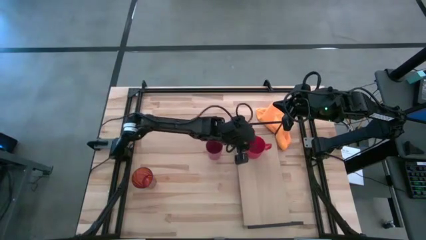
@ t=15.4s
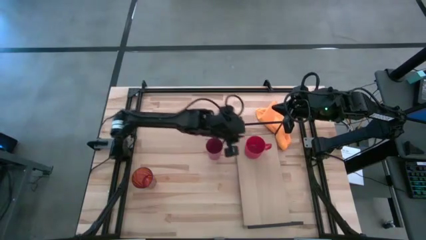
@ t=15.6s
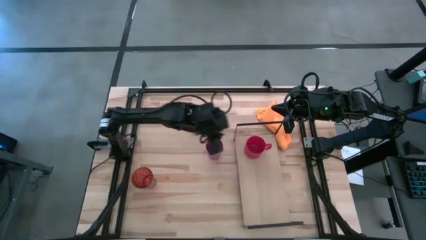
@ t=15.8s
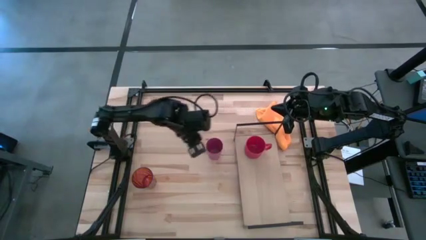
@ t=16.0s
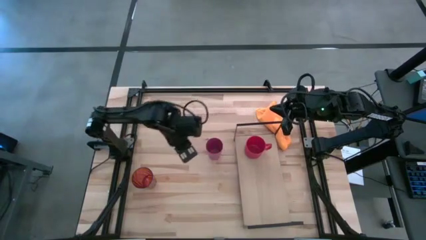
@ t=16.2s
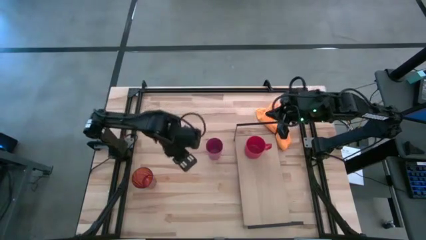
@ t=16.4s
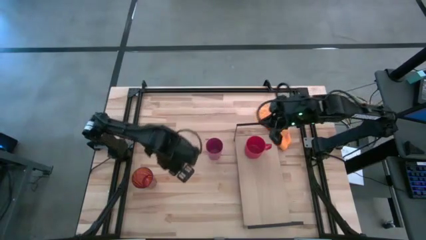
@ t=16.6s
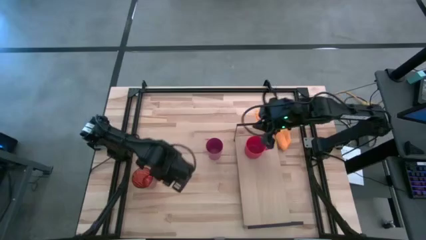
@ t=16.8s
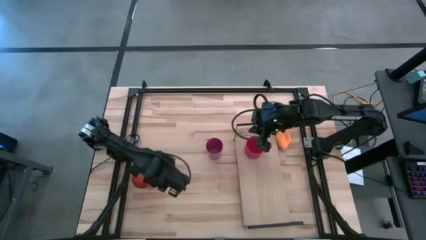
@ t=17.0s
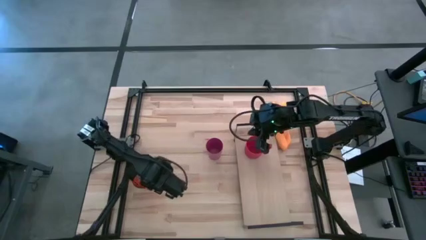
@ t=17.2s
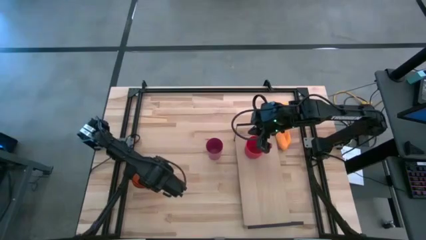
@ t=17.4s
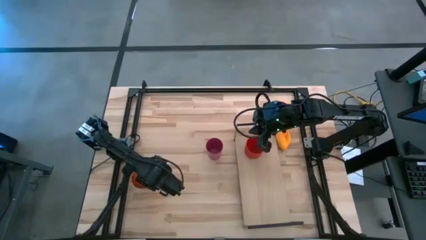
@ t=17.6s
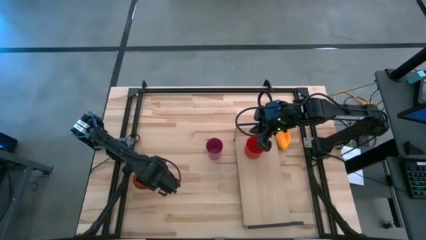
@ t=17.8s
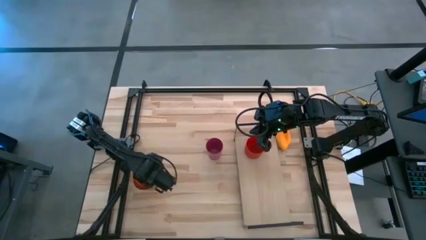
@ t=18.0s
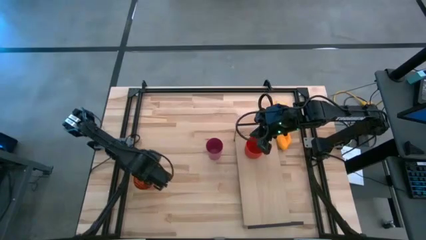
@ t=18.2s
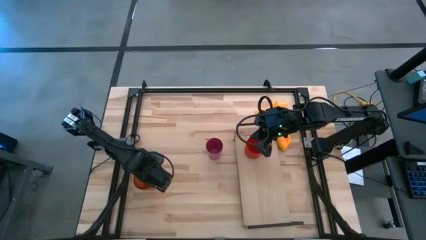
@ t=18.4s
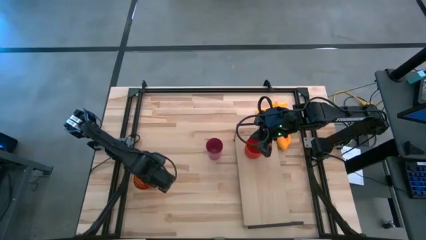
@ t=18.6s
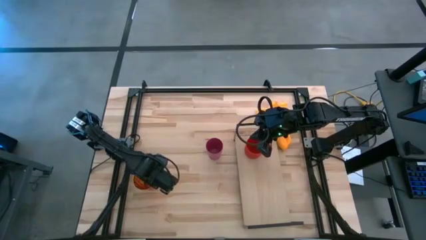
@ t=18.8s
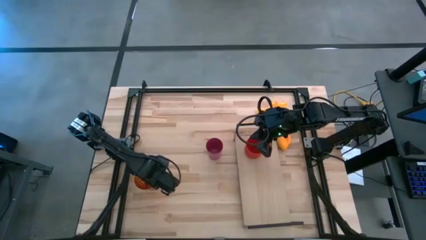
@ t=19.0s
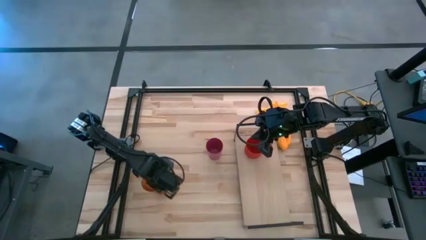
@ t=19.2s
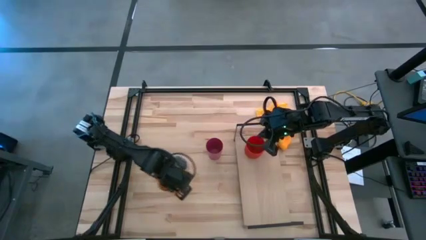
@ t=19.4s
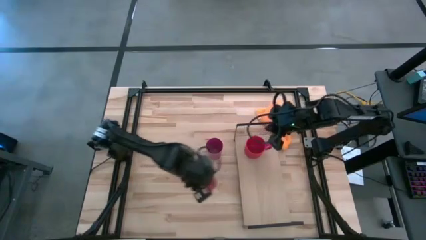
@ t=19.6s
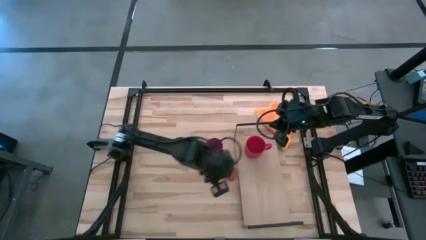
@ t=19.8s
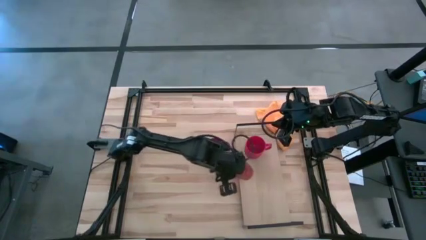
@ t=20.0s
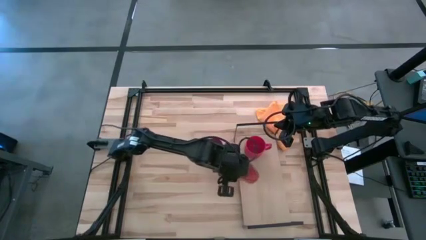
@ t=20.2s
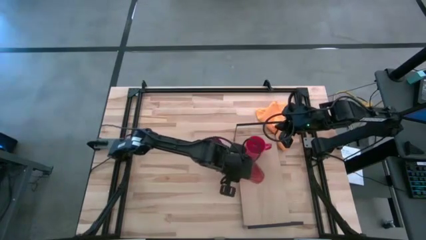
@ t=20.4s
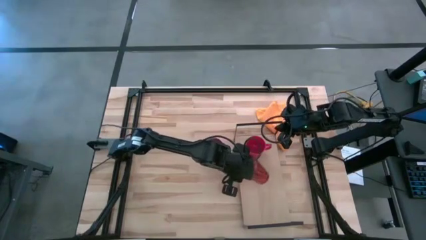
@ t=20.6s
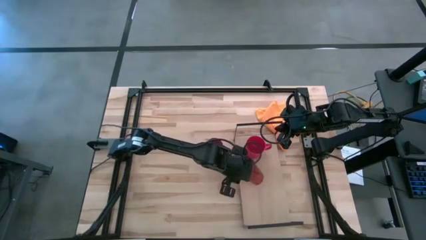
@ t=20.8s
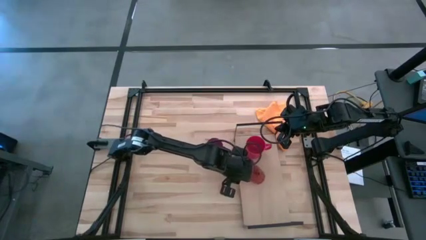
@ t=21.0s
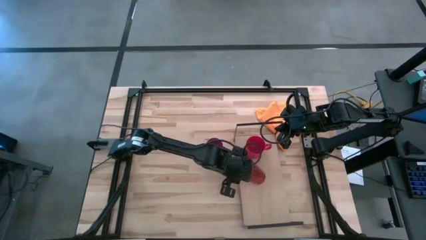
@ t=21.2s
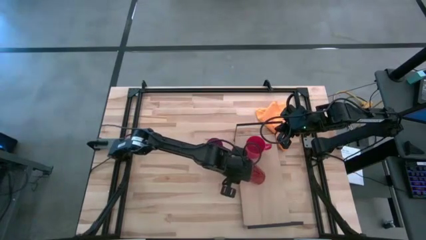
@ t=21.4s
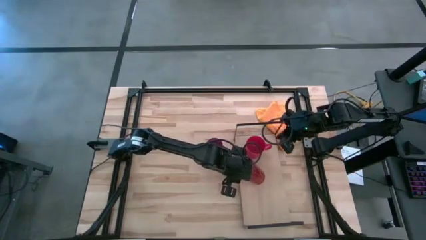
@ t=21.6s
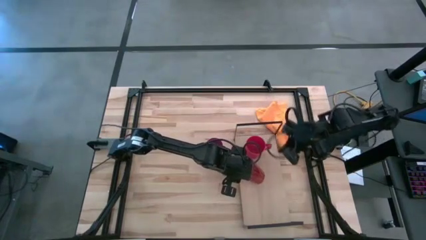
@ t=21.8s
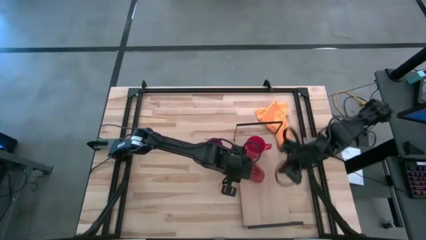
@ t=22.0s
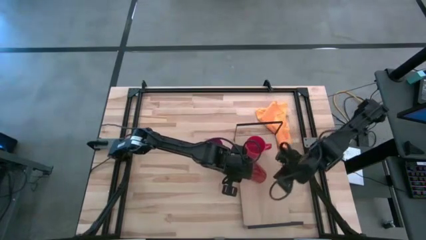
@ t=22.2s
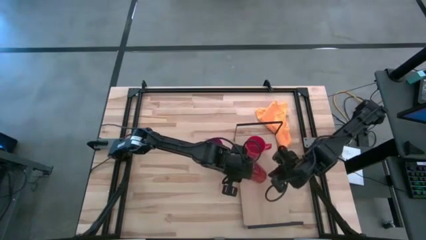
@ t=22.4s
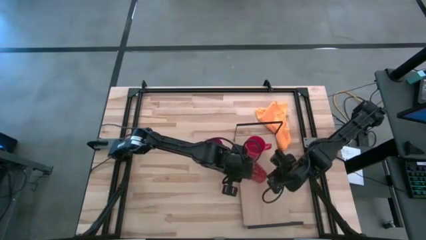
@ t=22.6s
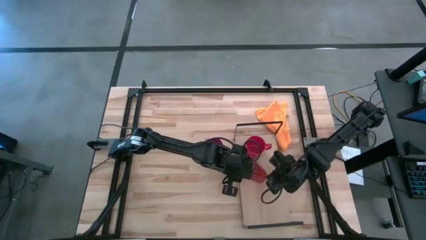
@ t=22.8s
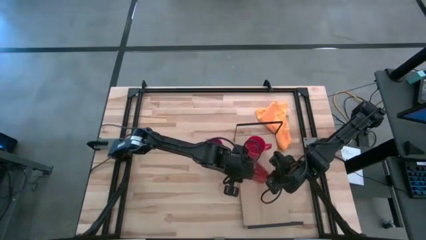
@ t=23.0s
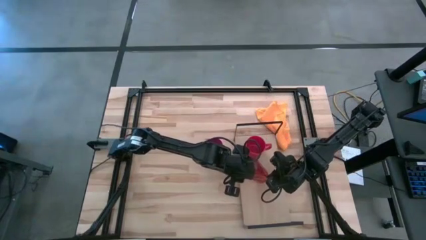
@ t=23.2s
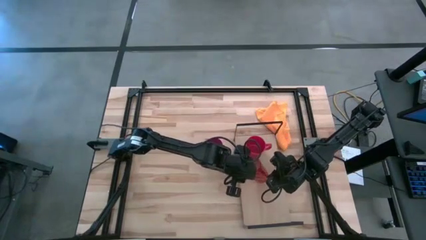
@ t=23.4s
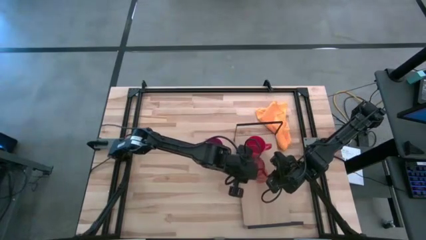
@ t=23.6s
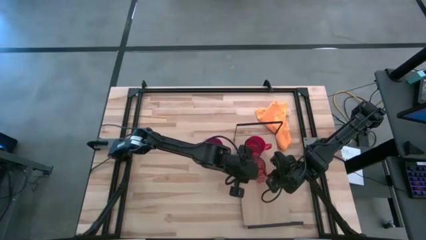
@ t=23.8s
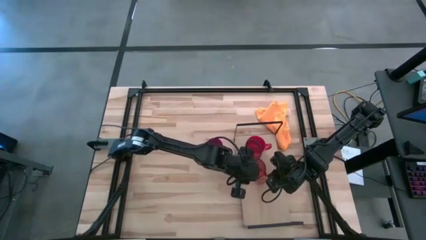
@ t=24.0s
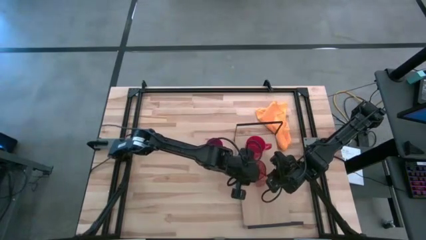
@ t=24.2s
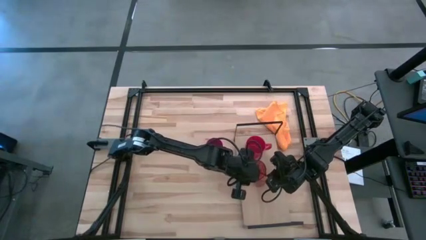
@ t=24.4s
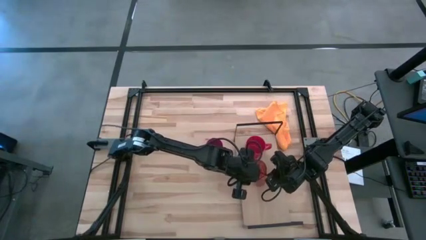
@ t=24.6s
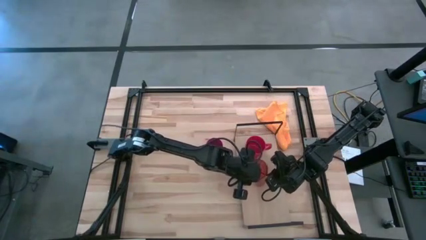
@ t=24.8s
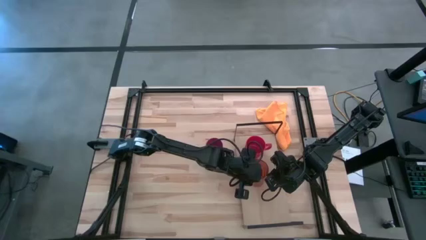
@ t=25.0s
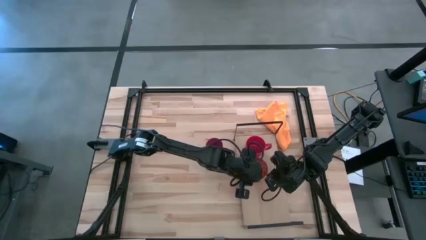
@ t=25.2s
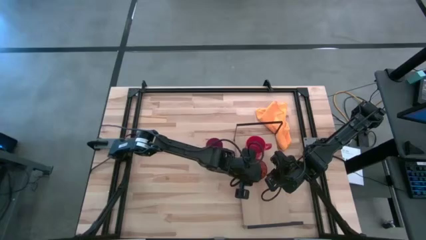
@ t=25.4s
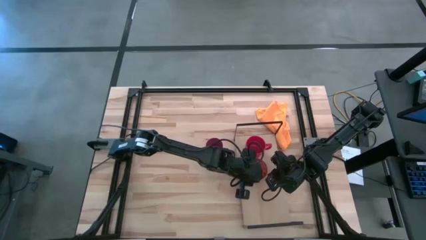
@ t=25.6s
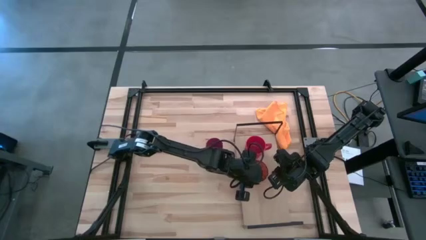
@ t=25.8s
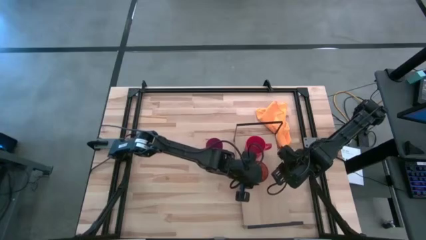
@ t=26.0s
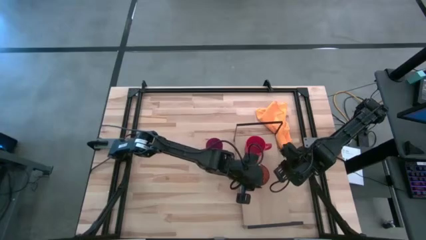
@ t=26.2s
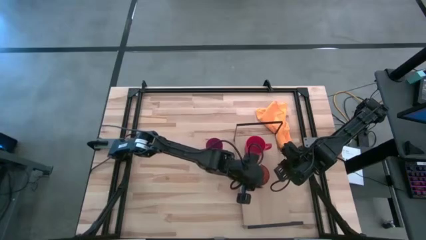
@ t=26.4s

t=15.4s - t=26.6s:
Task: Stack small to large cups/mugs on shelf
Put the brown cup on the shelf

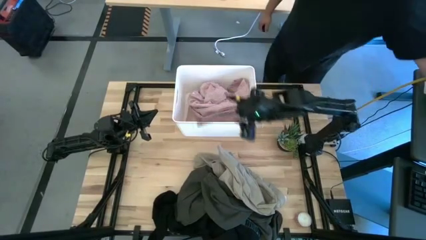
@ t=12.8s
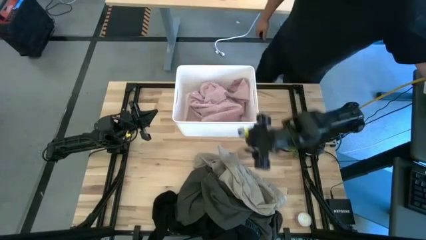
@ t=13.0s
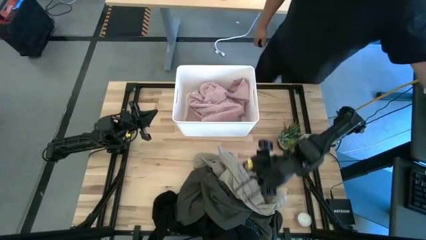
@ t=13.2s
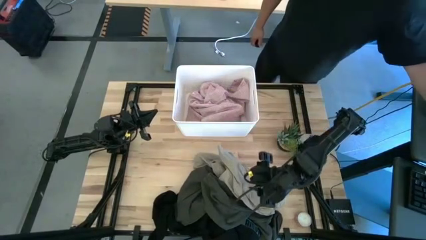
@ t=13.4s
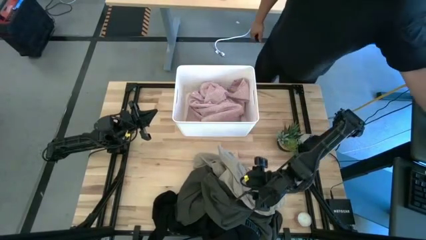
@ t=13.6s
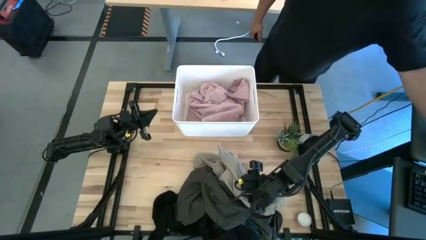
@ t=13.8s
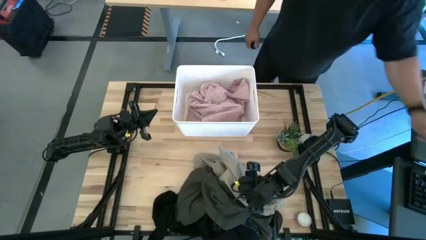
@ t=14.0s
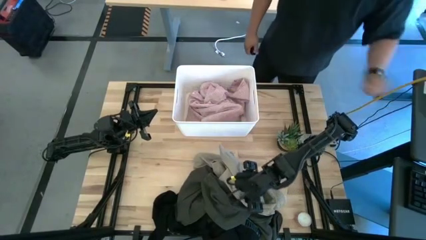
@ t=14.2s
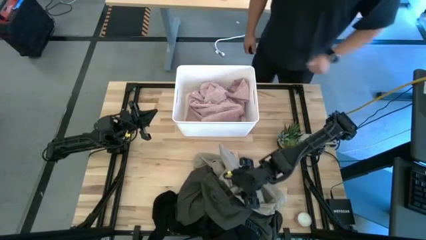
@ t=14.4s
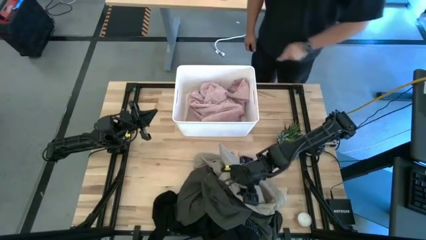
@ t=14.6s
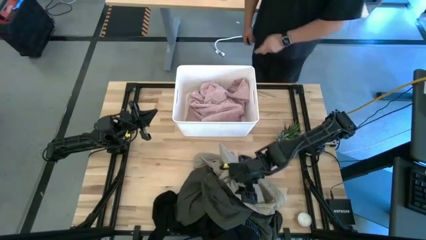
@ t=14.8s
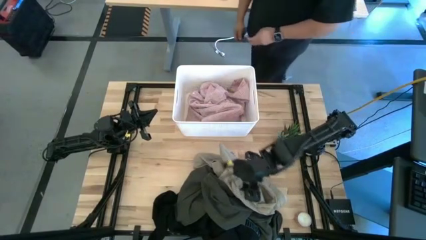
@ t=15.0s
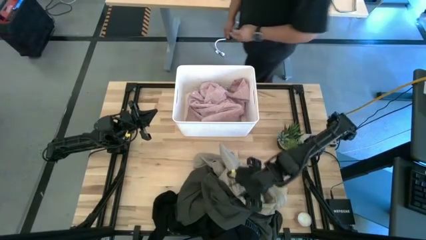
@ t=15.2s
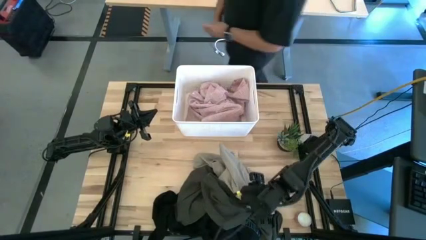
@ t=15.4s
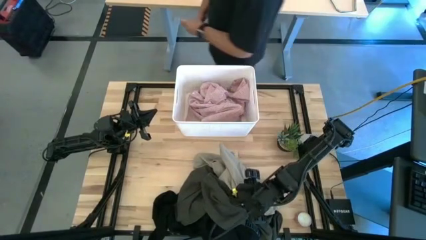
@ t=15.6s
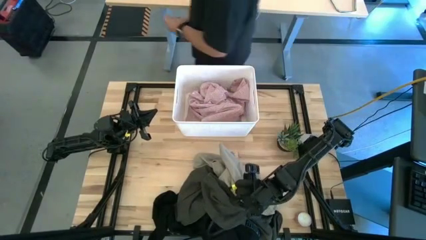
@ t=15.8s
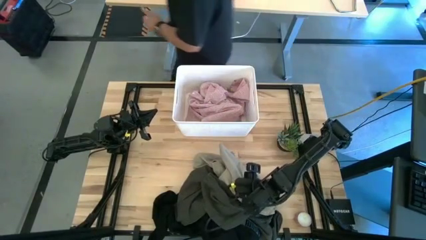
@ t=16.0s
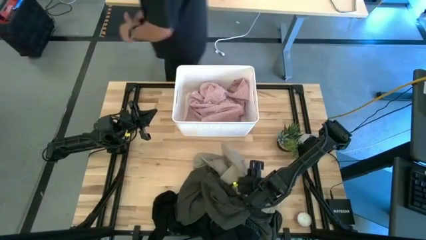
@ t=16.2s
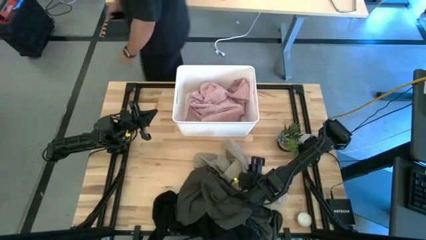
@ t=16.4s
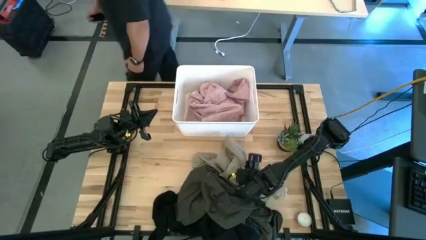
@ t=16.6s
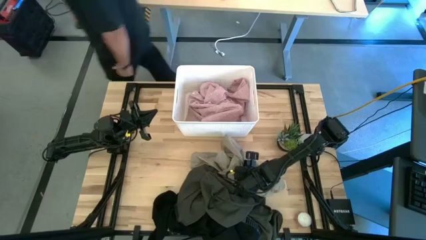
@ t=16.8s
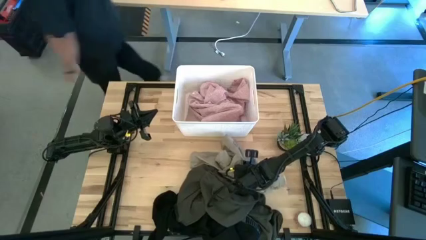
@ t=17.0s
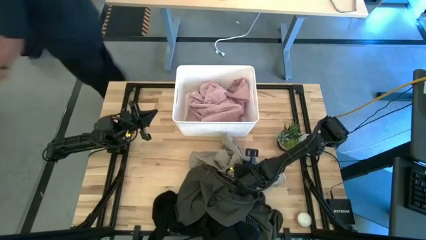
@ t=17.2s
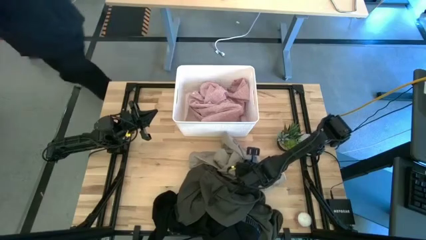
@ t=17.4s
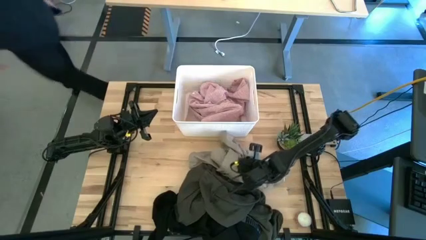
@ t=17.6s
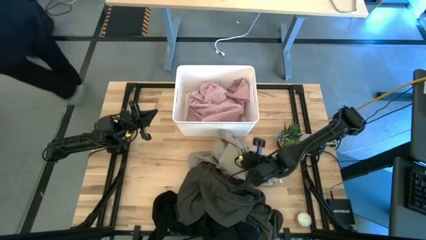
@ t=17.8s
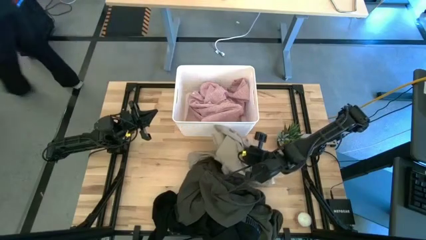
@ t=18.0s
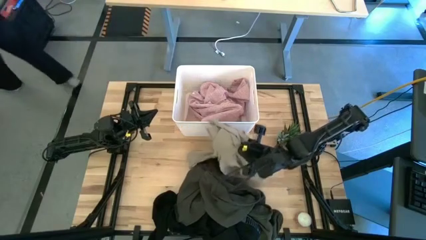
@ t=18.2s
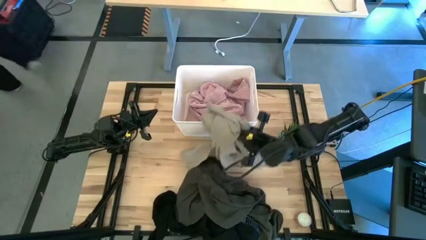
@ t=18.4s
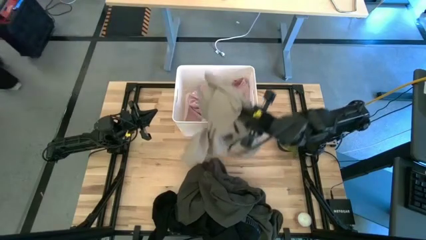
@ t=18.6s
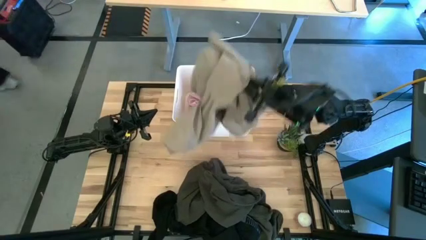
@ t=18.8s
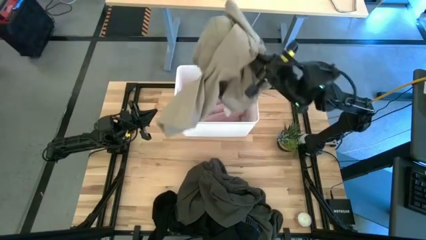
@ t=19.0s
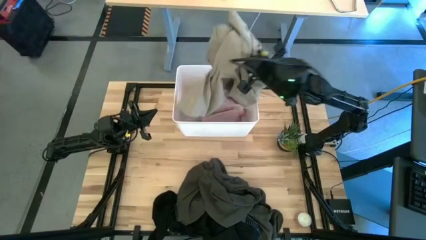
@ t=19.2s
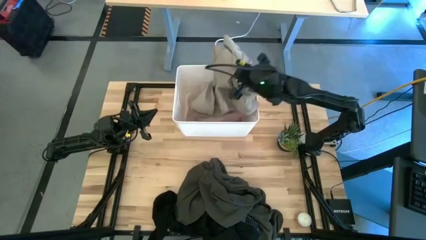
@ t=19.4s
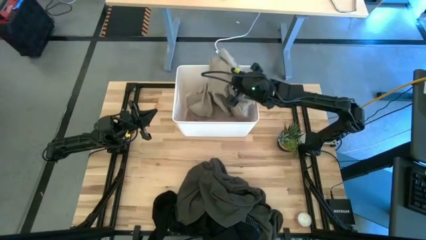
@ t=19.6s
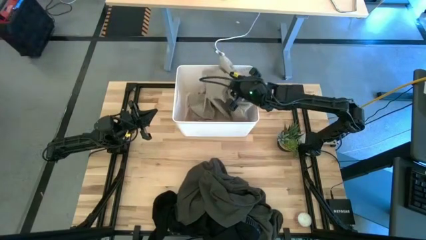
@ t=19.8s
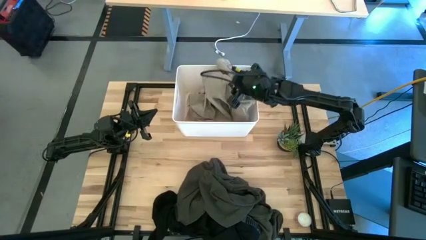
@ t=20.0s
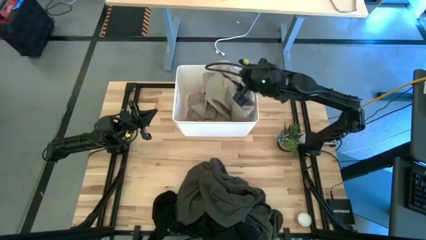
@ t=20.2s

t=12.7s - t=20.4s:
Task: Sort clothes
Put the brown shirt in the white container
